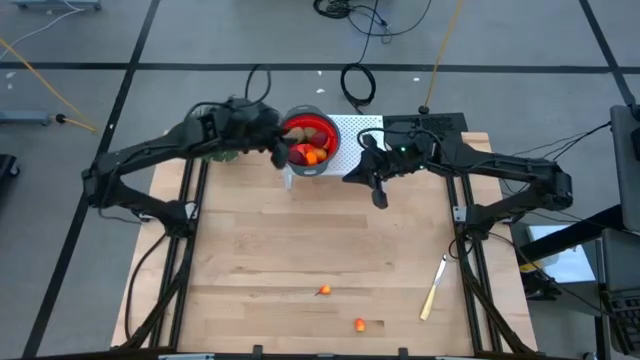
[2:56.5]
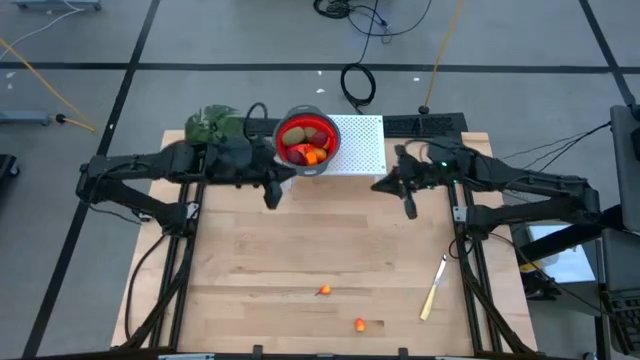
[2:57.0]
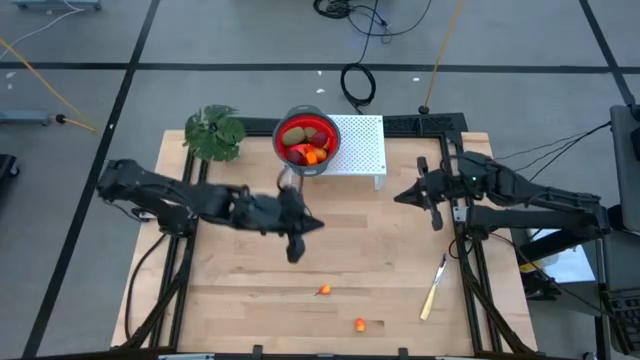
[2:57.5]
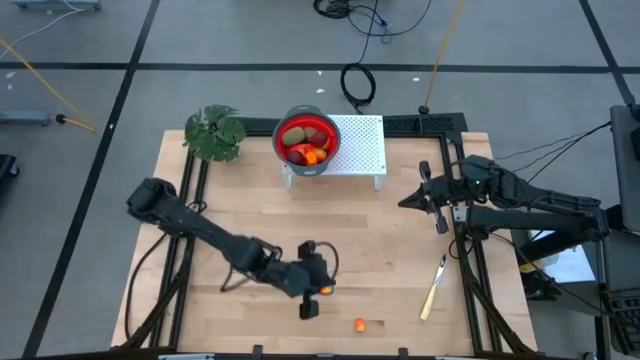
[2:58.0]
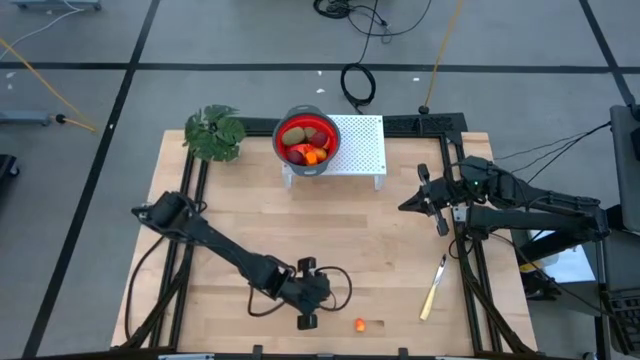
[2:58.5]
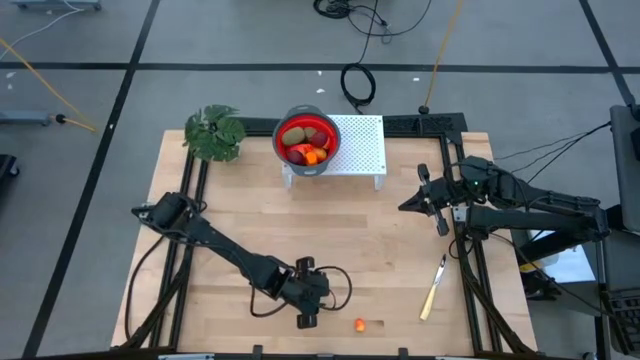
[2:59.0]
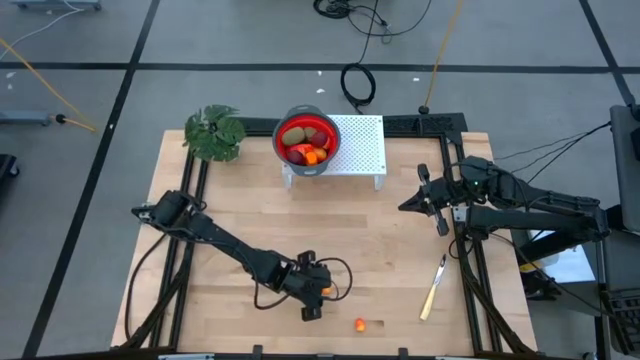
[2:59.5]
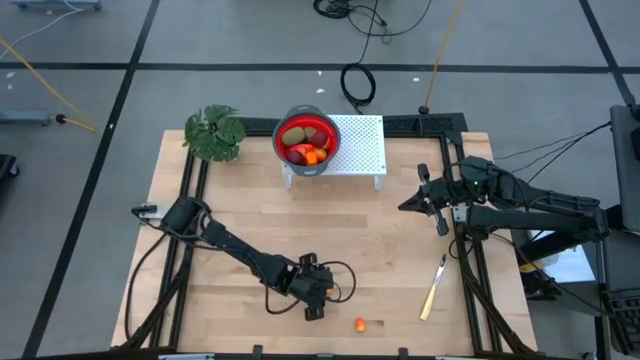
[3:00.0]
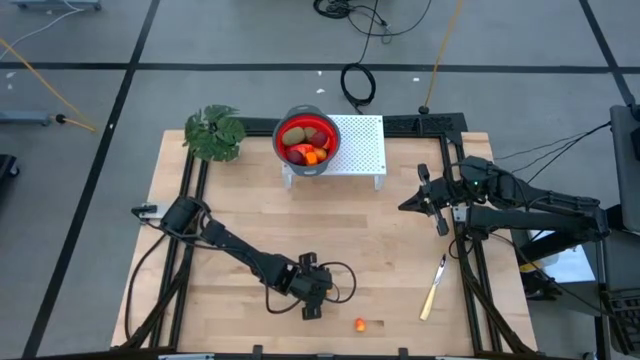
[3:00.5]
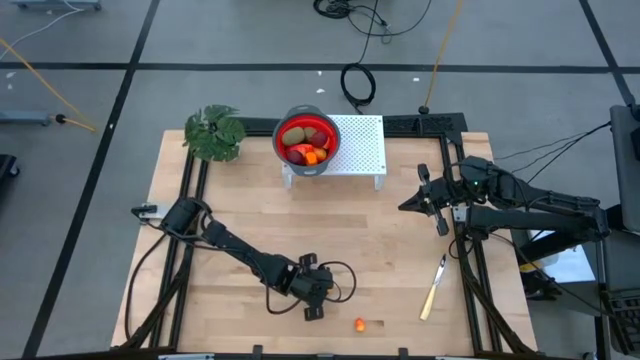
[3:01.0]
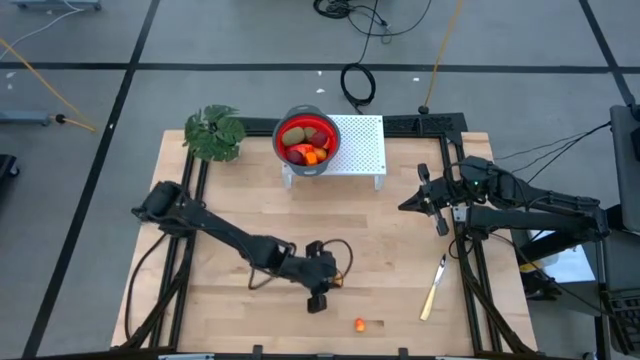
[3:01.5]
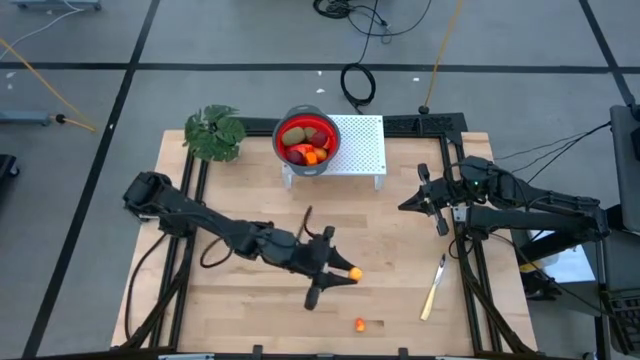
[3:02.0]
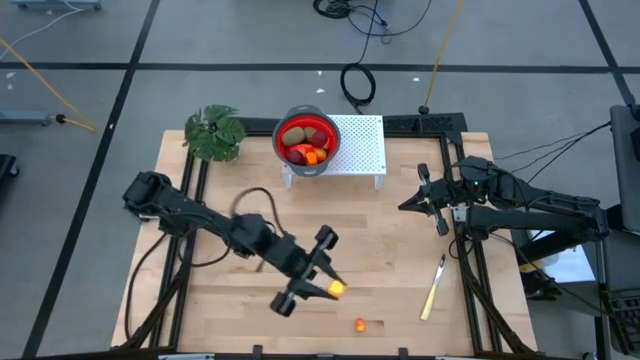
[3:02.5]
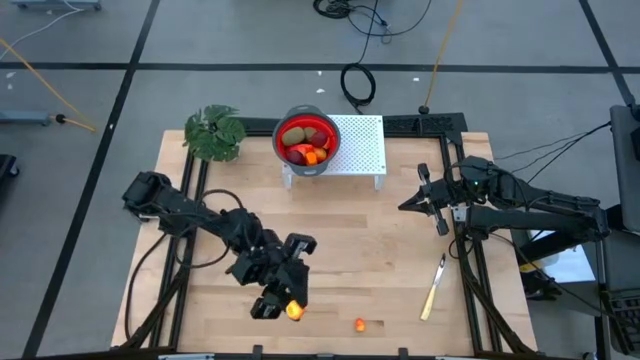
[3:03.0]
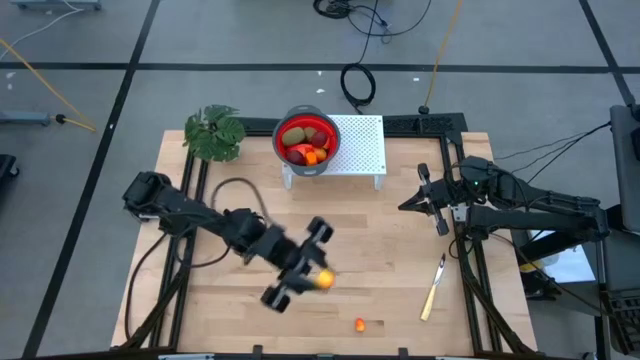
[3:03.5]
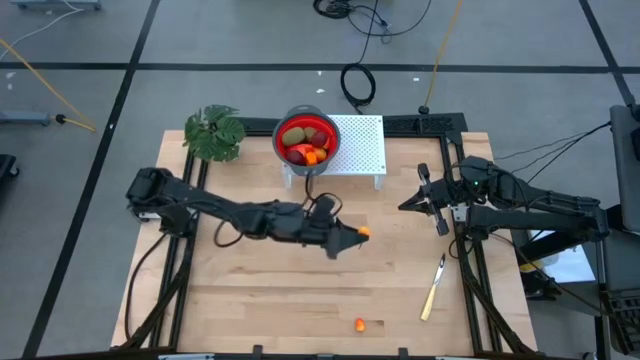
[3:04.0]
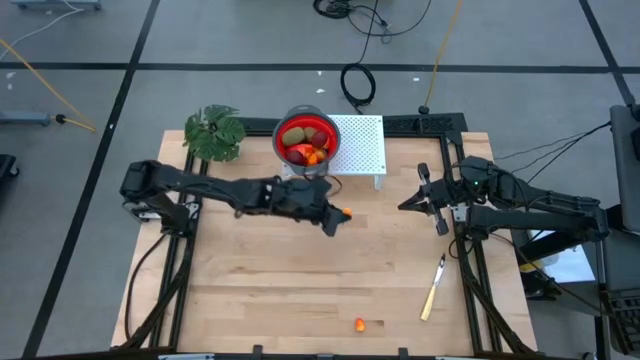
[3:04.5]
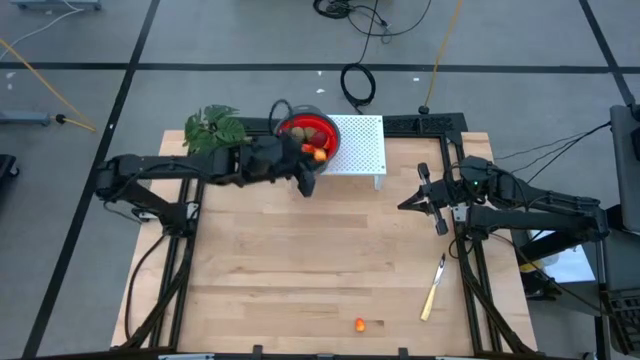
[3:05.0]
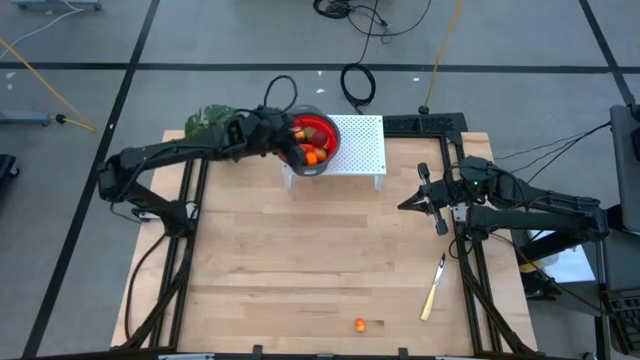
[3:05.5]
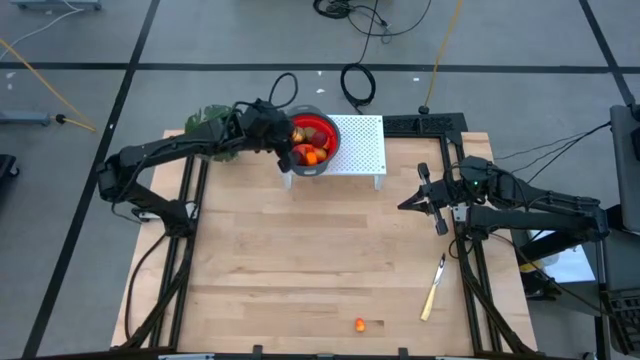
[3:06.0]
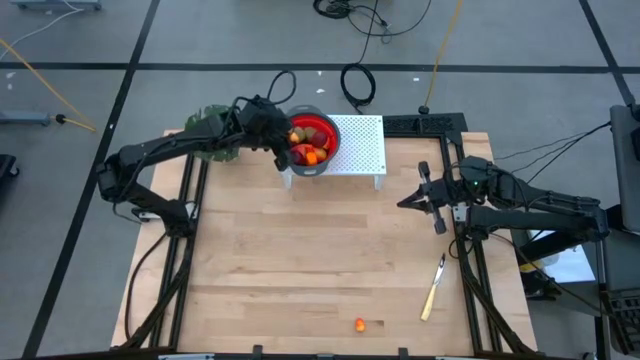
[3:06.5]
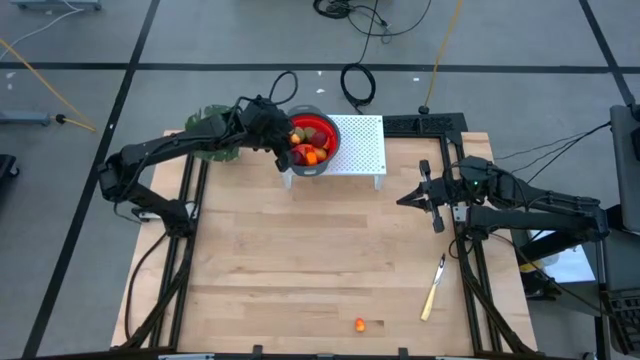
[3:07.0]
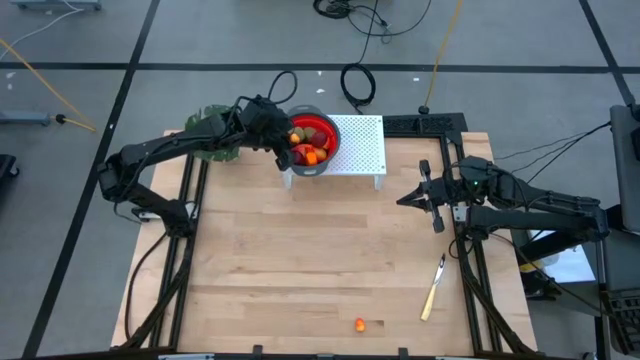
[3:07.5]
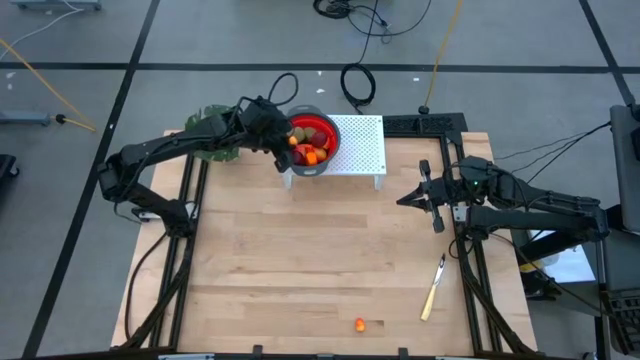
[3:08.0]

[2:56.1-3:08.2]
Task: Pick & Place Fruit
Put the top peach into the red strainer bowl

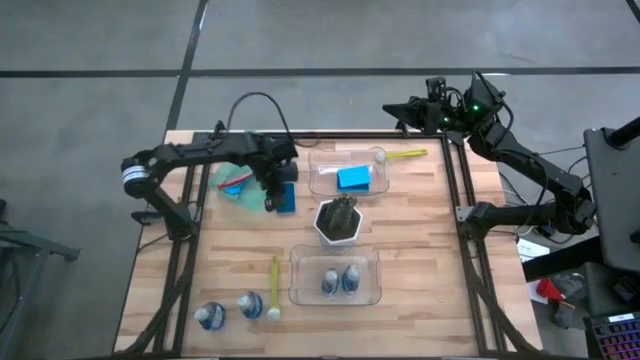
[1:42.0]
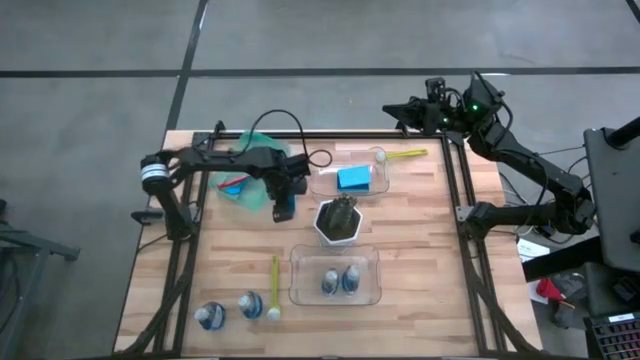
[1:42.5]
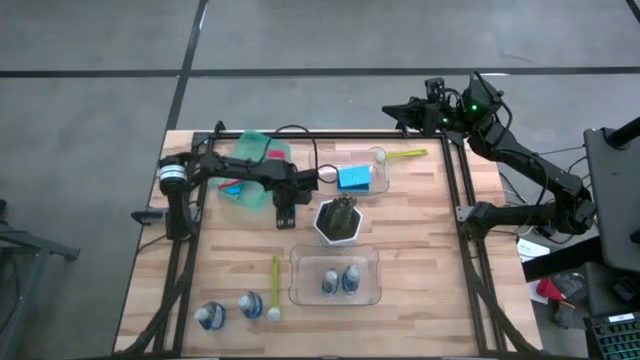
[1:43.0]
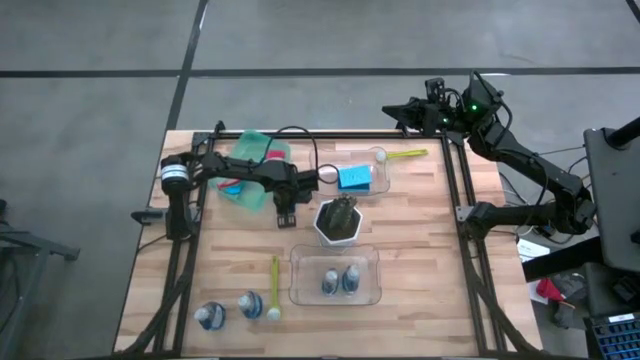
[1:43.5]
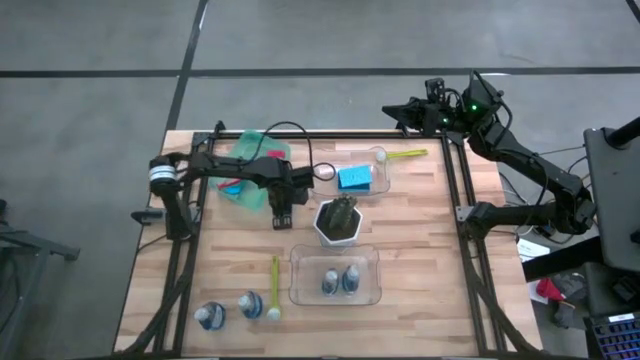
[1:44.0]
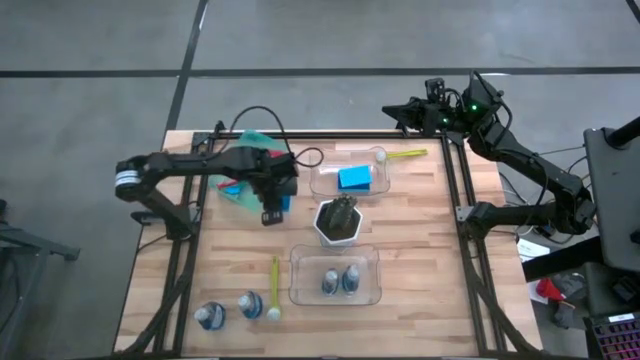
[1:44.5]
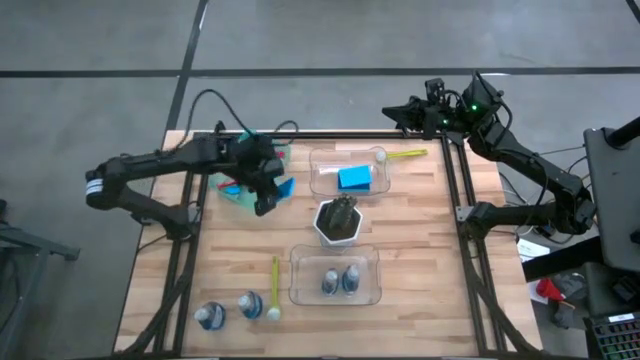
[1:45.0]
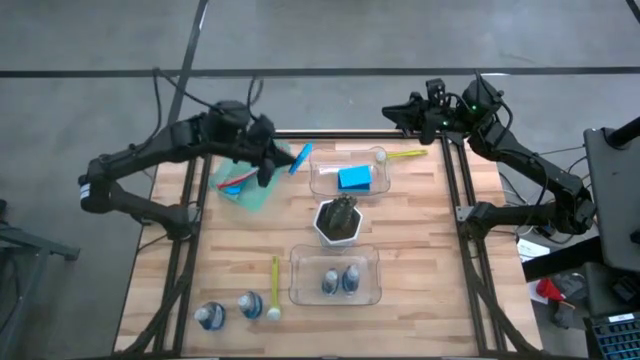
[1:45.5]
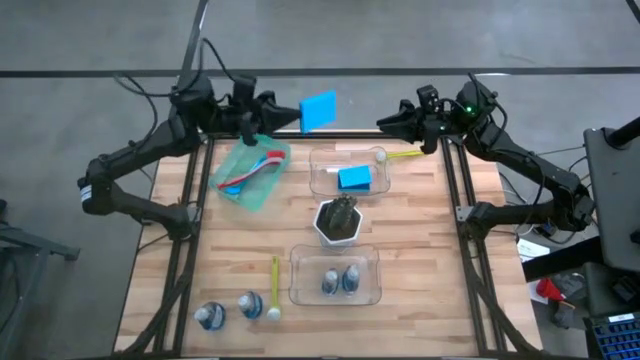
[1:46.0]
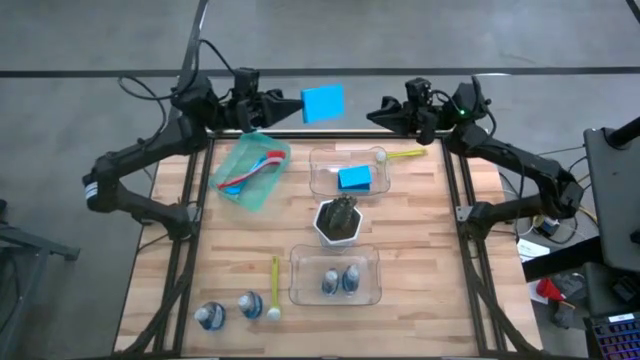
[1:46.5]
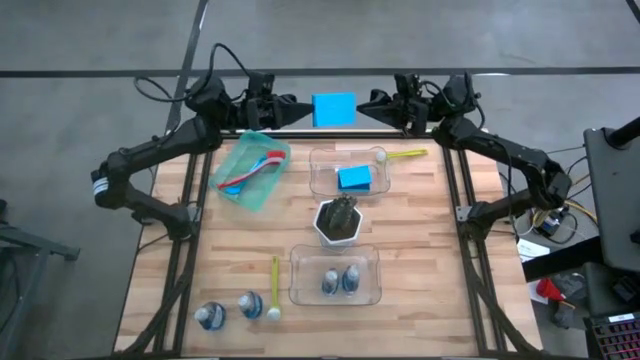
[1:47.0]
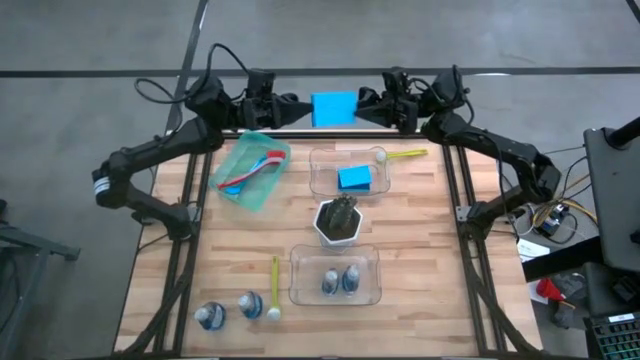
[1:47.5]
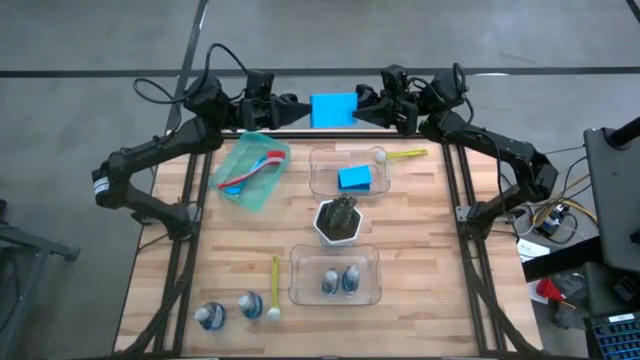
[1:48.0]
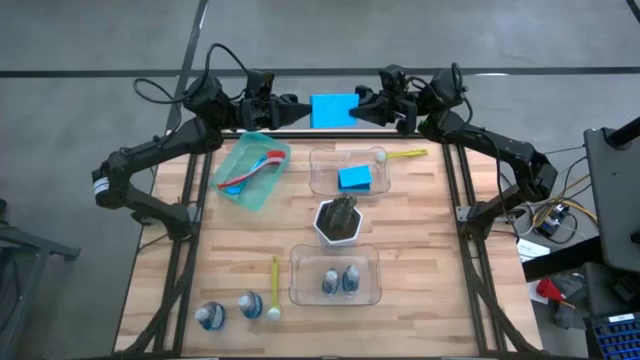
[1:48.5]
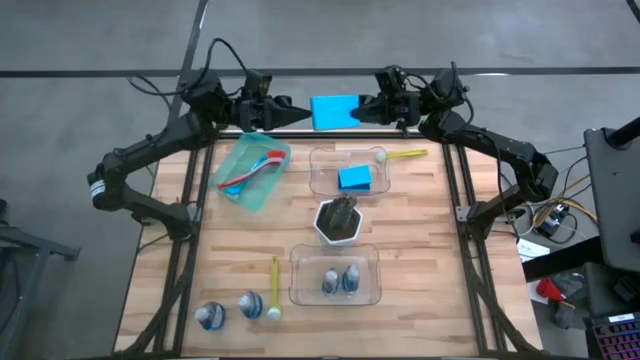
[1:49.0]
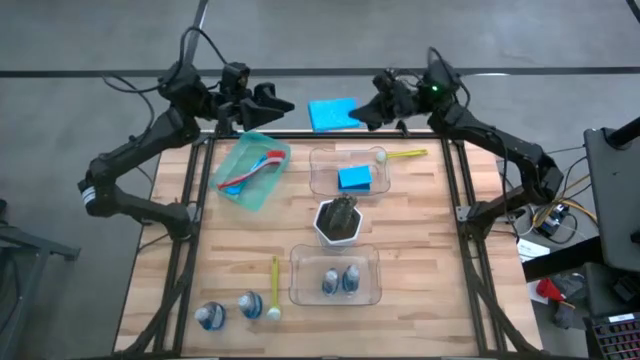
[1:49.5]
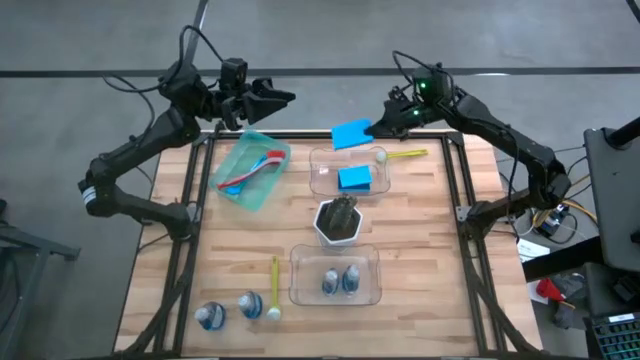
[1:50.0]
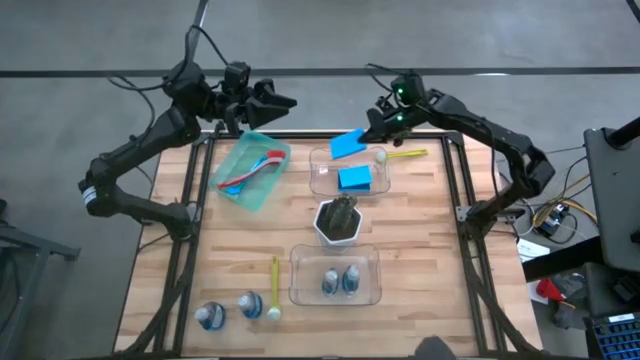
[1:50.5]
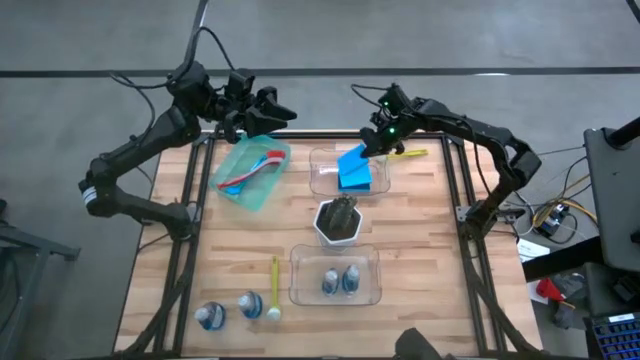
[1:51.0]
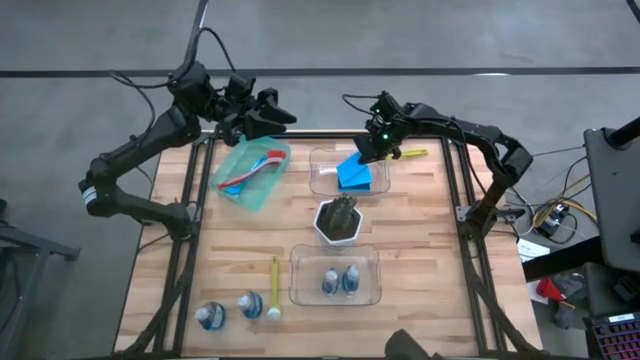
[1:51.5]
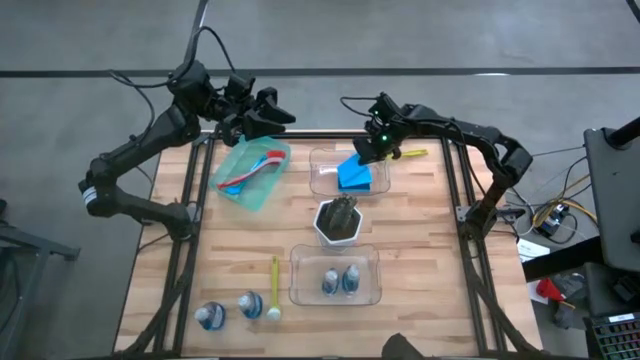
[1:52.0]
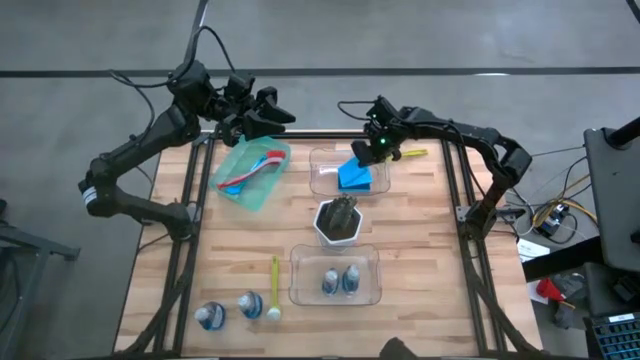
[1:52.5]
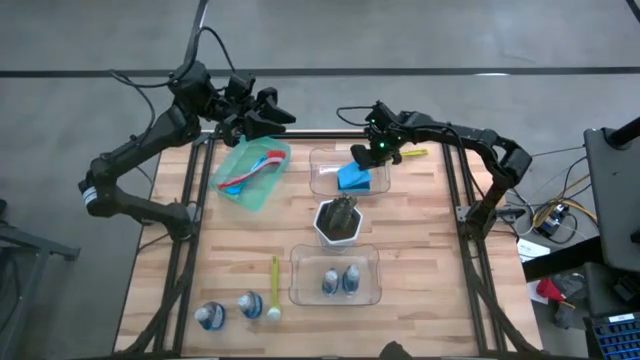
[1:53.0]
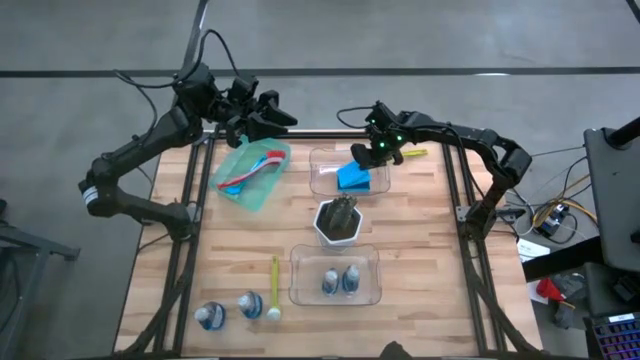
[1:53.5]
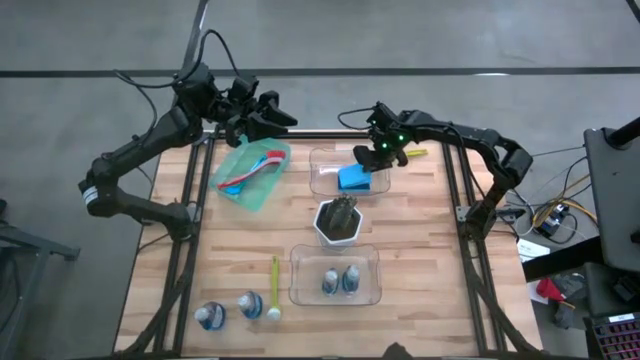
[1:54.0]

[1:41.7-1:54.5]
Task: Pick & Place Kitchen Sink Supplies
Put the blue sponge wipe into the top transparent bin
